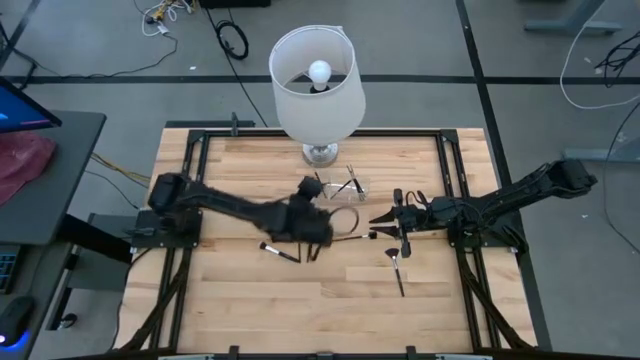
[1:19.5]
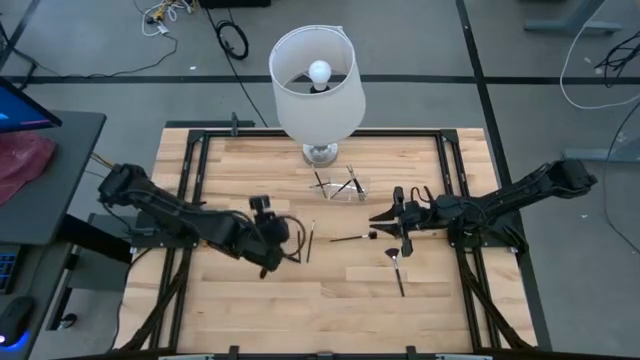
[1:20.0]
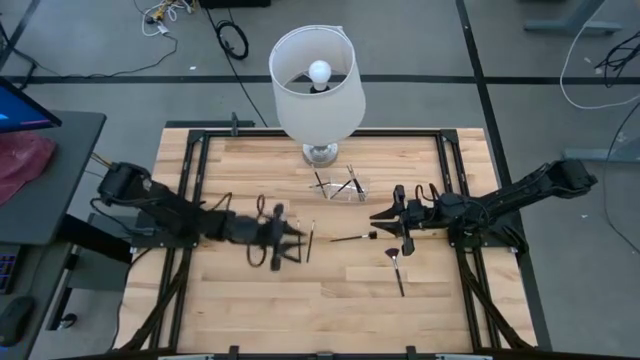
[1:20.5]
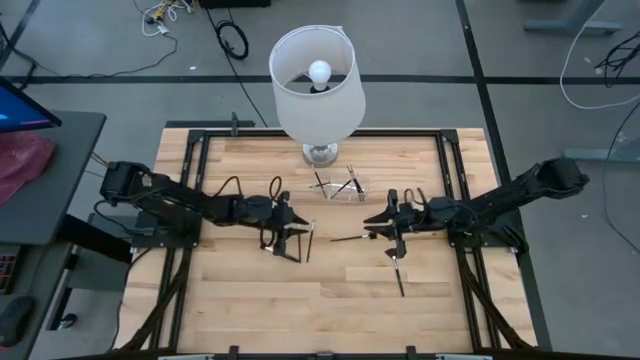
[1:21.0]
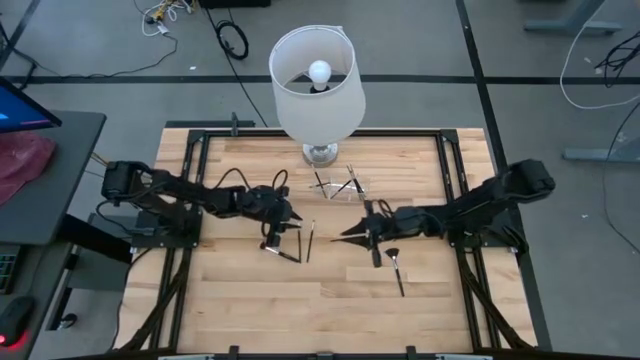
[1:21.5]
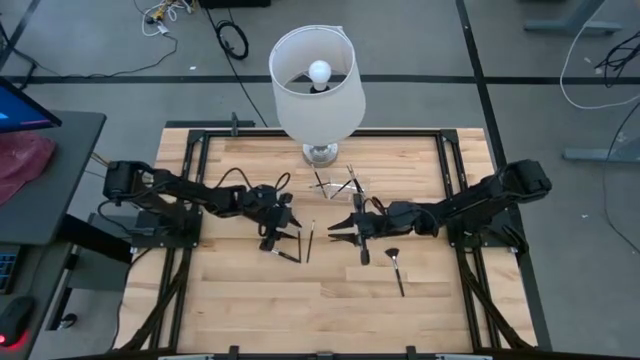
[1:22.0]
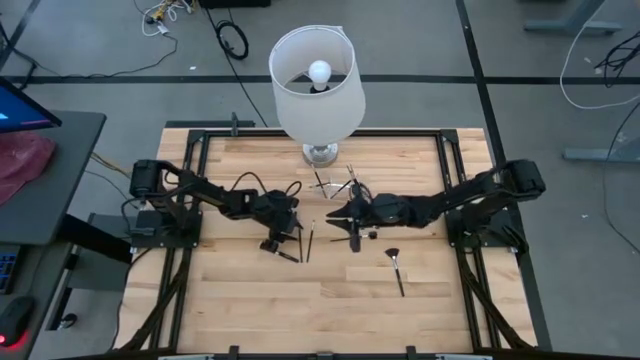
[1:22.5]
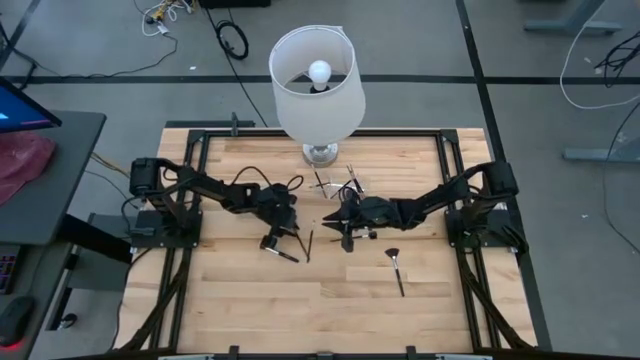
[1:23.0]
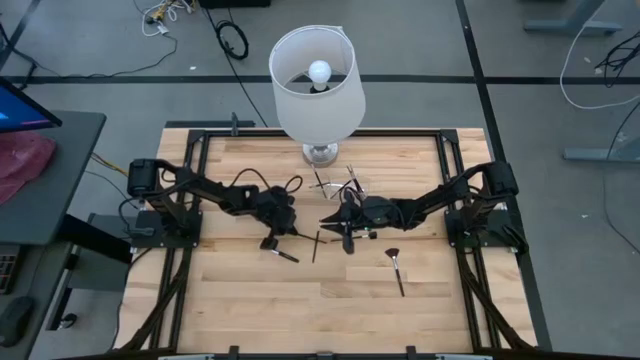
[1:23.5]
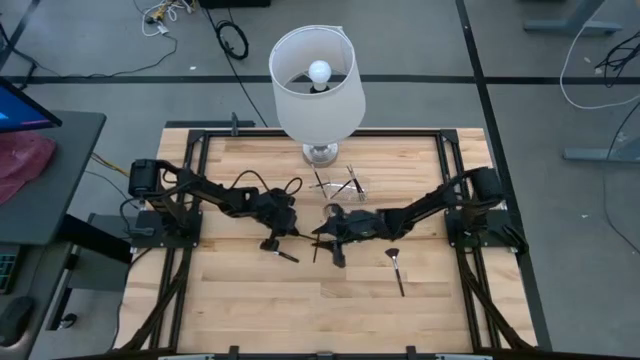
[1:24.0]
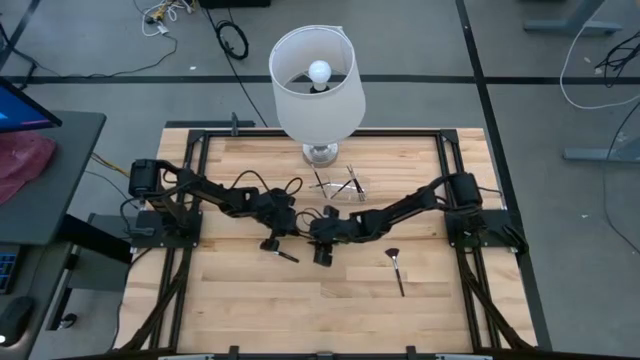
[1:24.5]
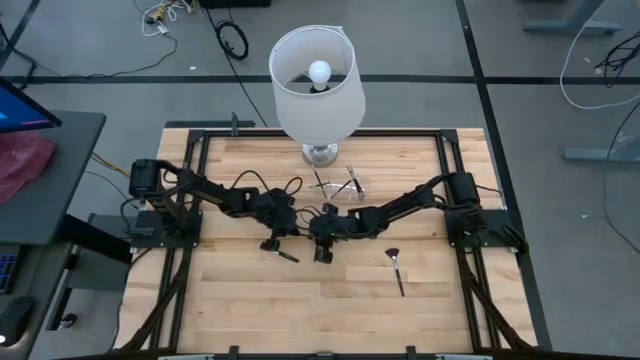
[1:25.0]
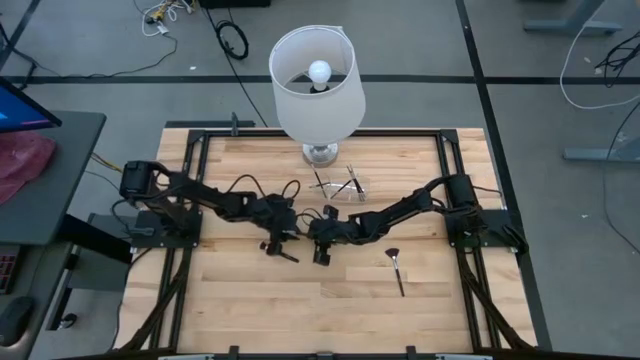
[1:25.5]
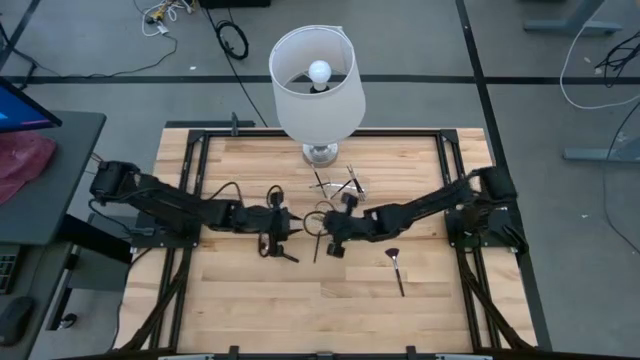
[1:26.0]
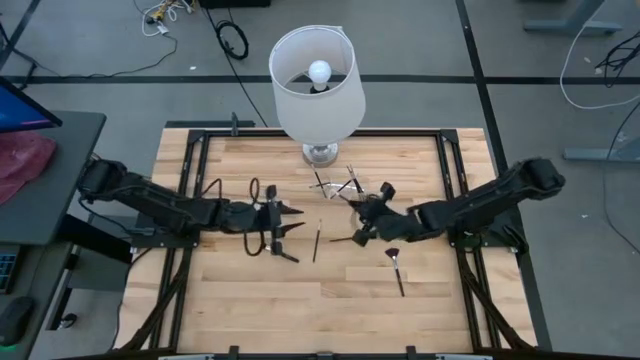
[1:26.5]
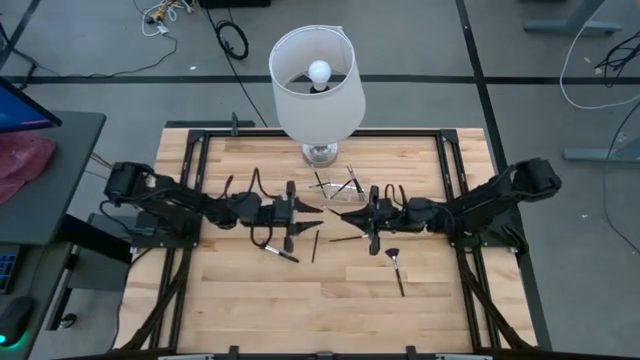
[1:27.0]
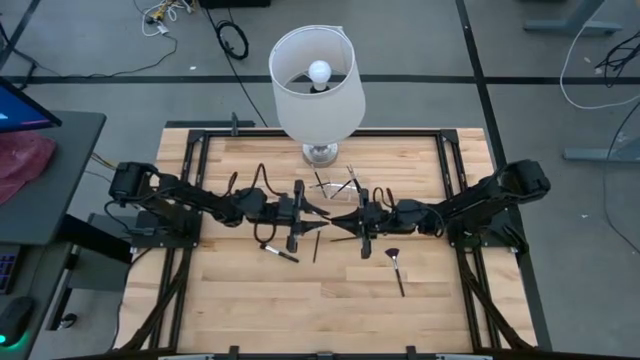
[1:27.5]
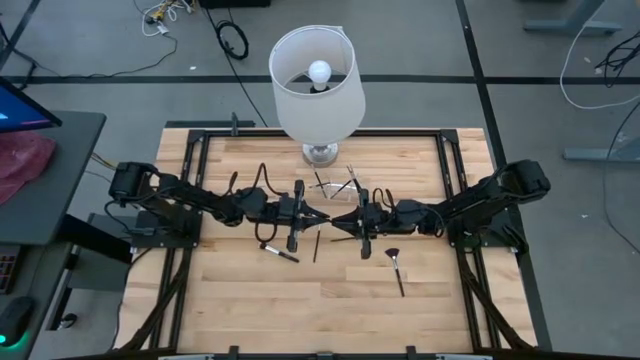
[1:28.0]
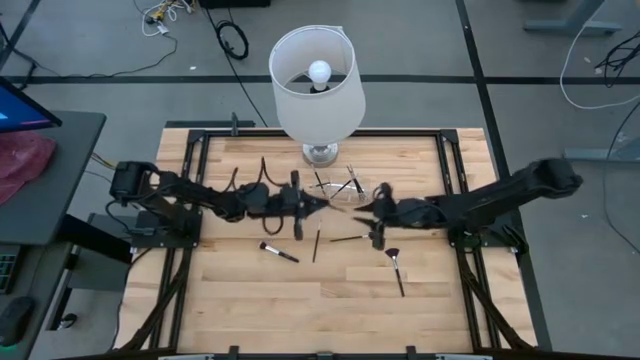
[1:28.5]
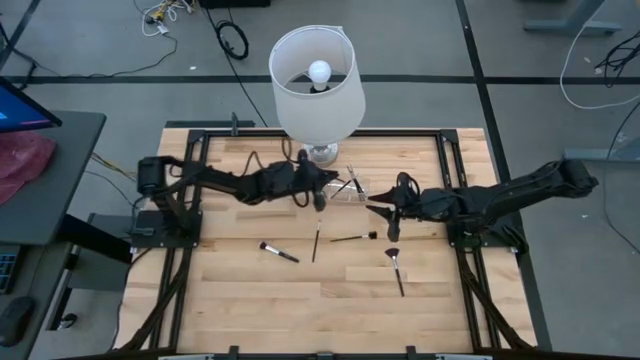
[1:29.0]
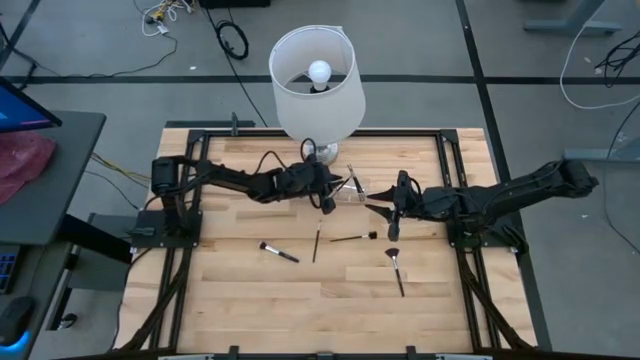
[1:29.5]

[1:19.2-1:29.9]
Task: Put items in baskets/containers
Put the black eyeshadow brush into the transparent organizer

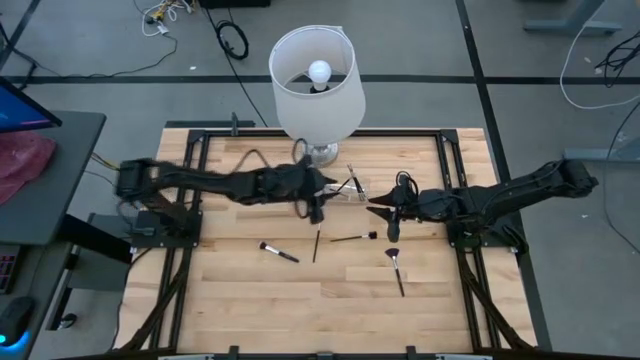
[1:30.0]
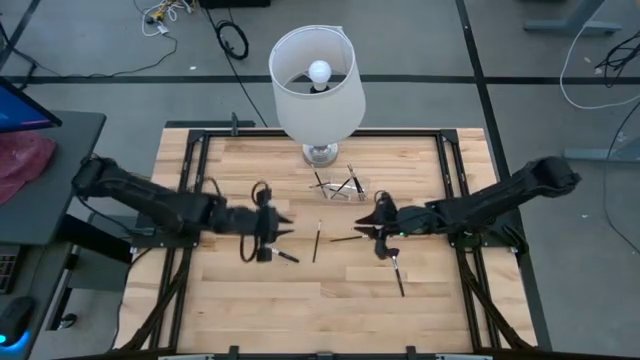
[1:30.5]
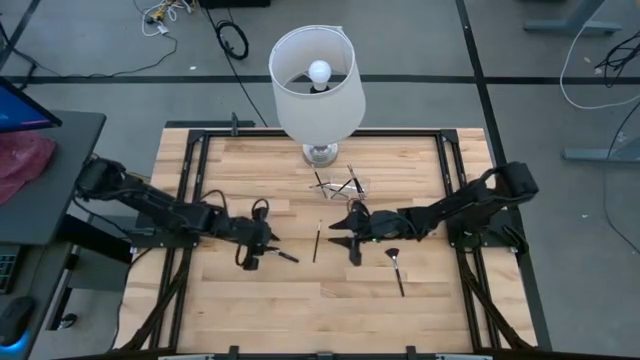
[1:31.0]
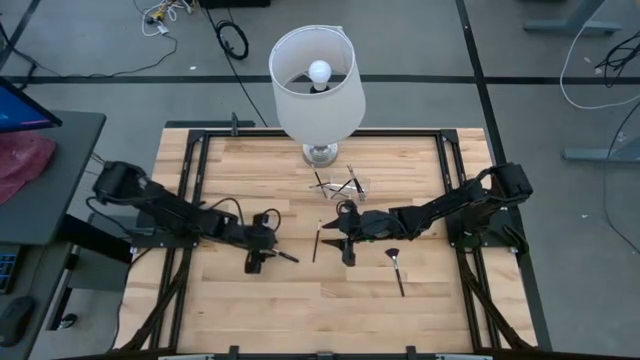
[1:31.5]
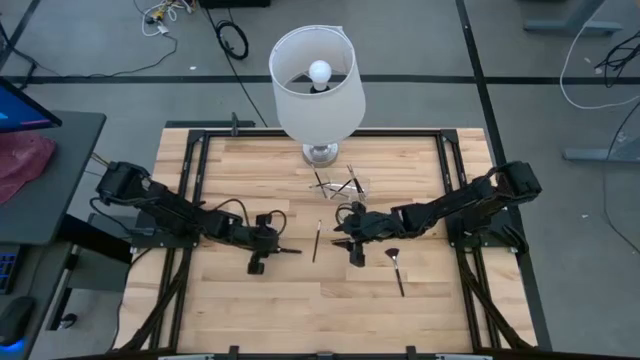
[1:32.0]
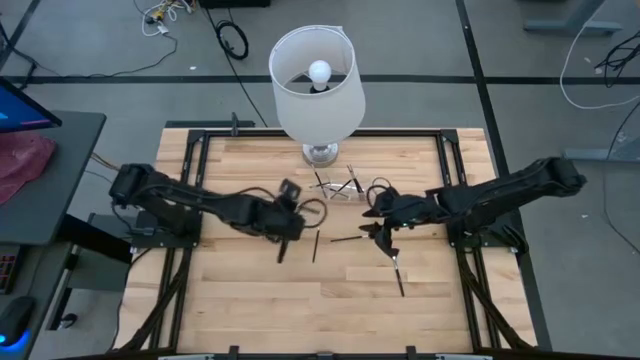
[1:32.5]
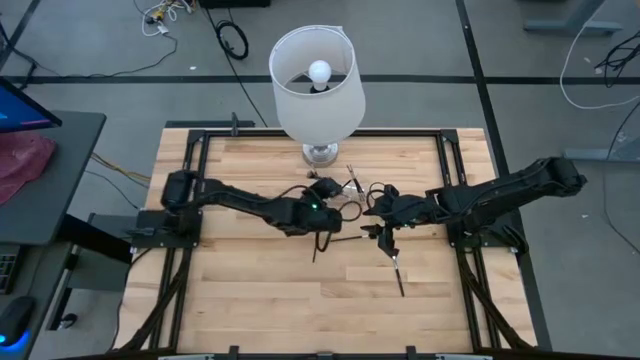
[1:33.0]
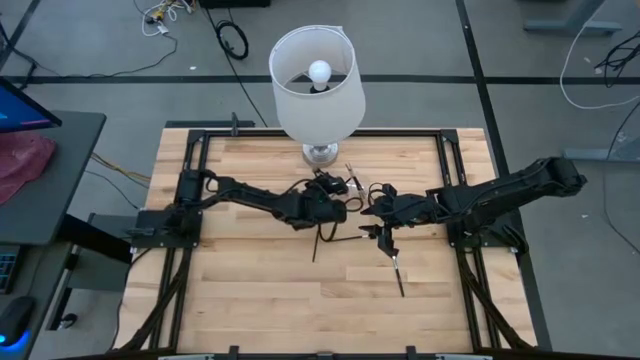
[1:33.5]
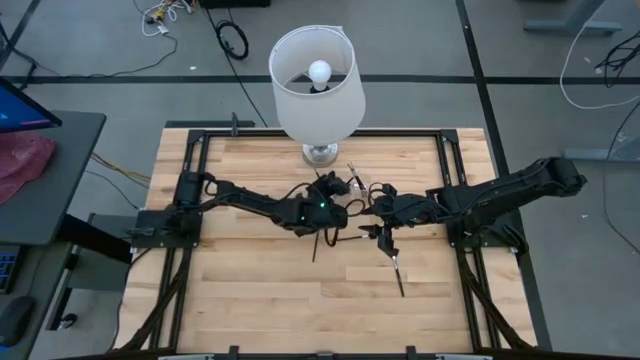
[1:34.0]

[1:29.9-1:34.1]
Put the black powder brush into the transparent organizer
